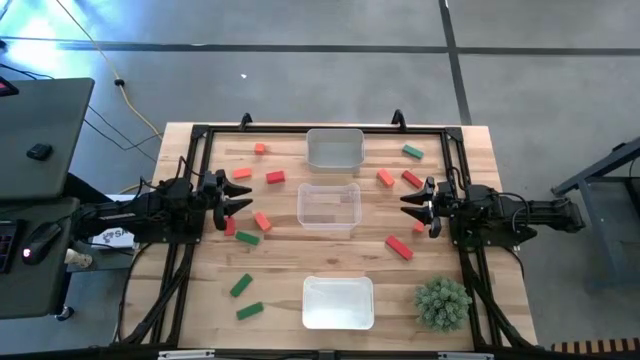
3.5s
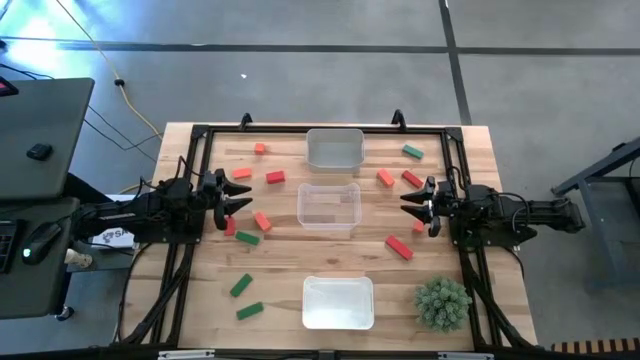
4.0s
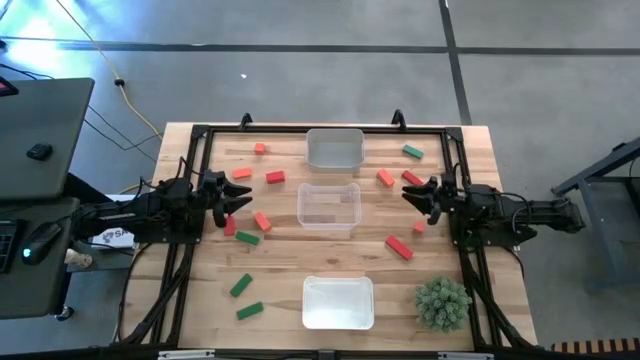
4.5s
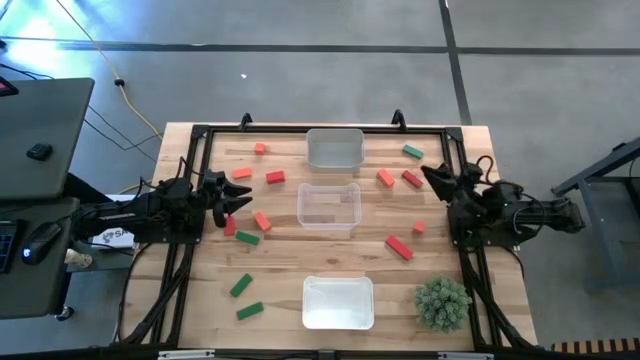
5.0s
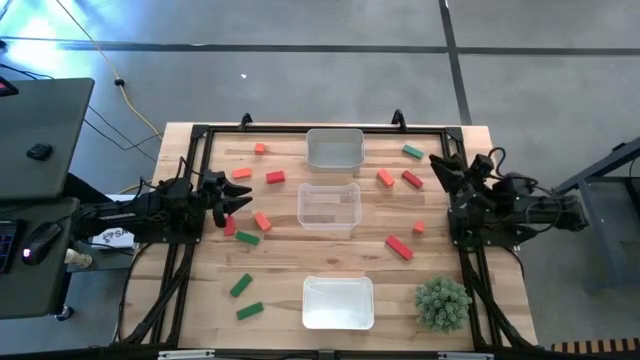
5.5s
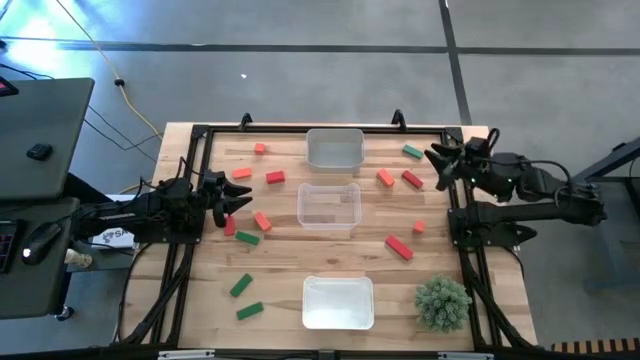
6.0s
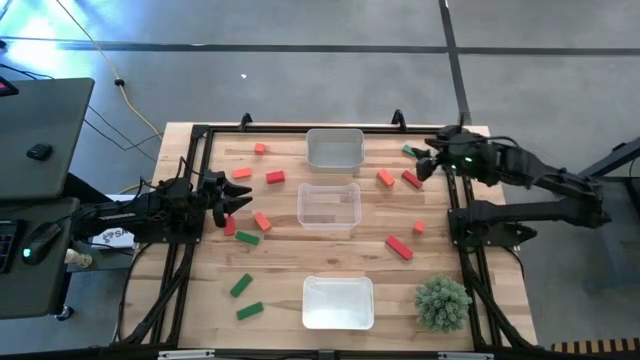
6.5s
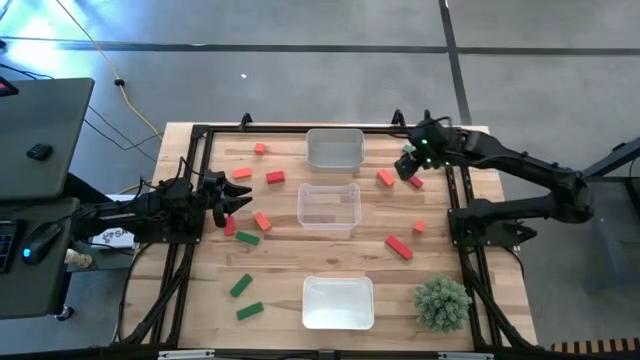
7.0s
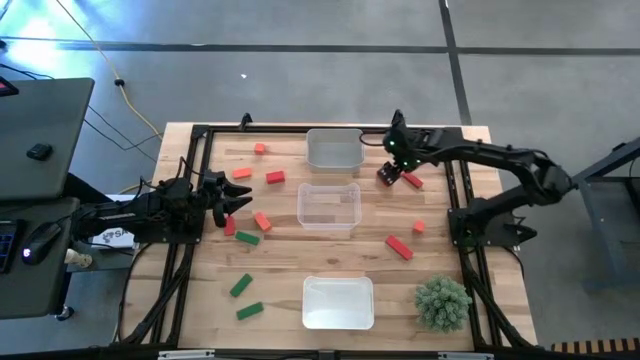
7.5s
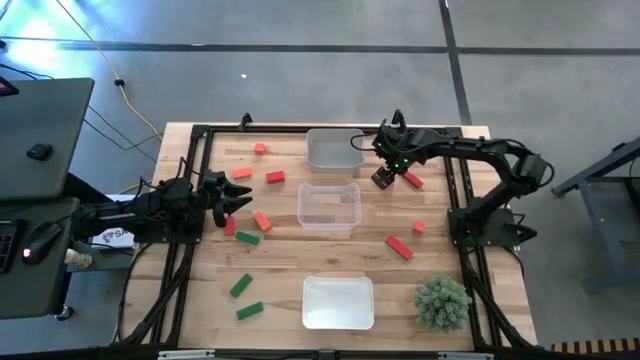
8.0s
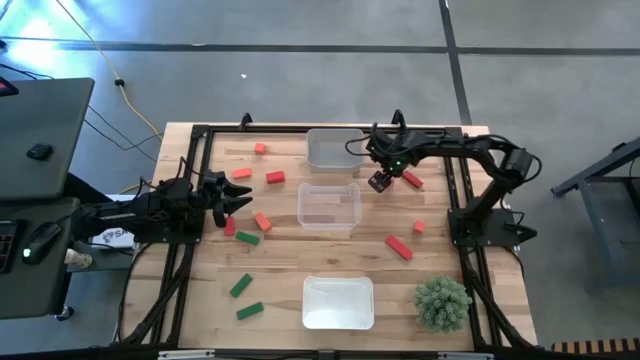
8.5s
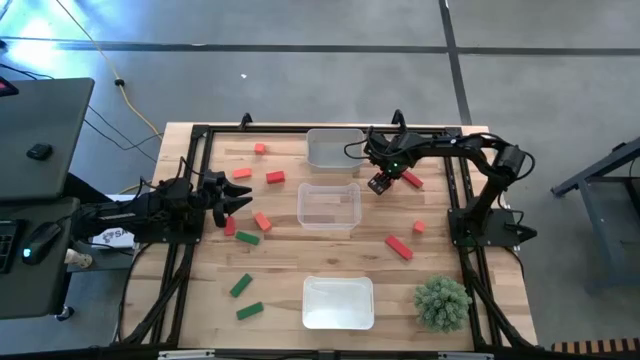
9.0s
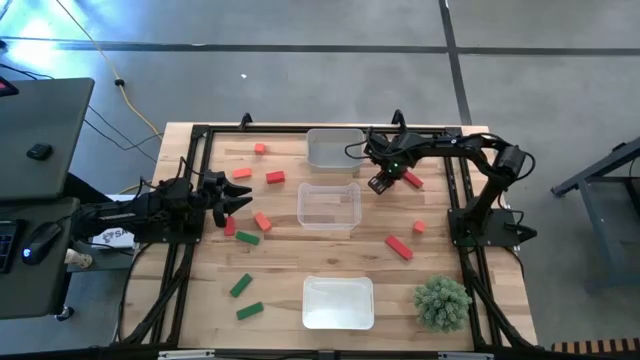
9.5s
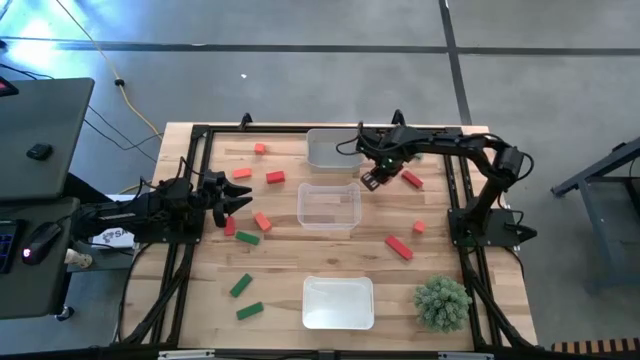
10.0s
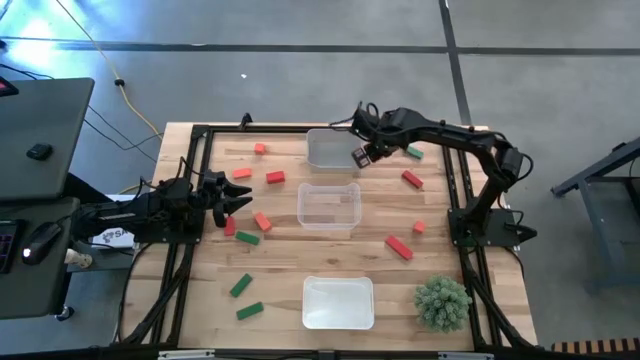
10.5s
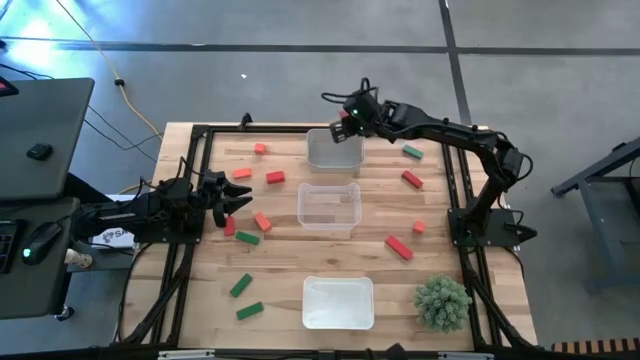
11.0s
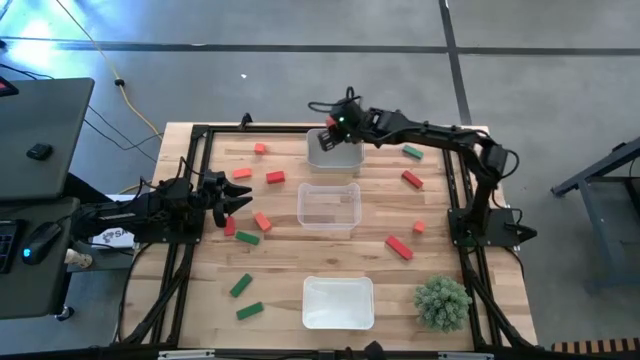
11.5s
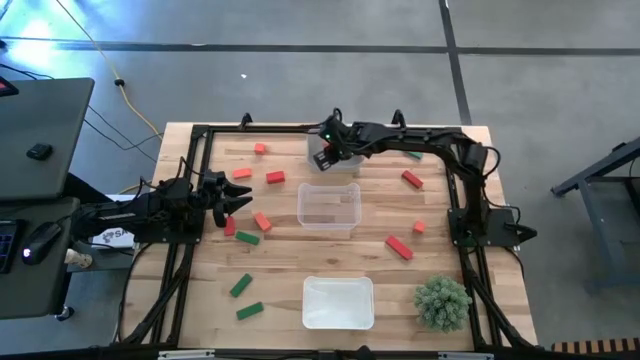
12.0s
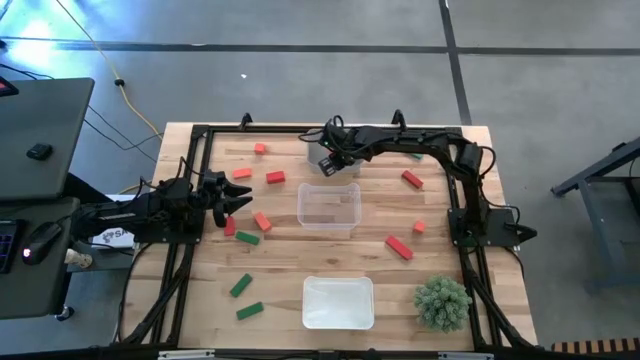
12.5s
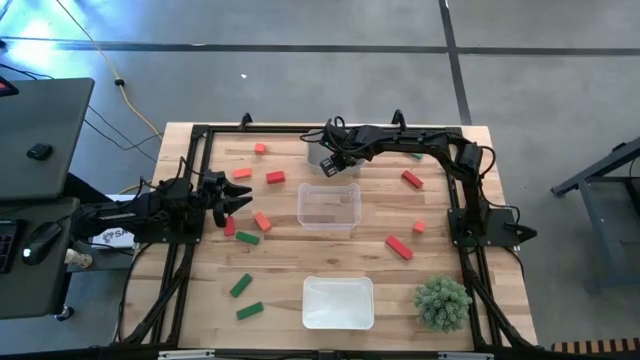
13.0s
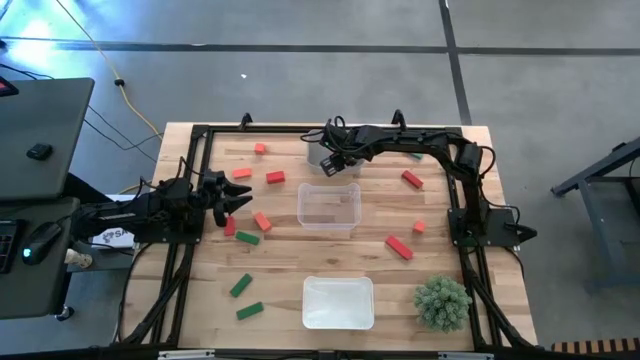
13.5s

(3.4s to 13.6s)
Task: Sort & place blocks by color
Put the orange block into the gray bin

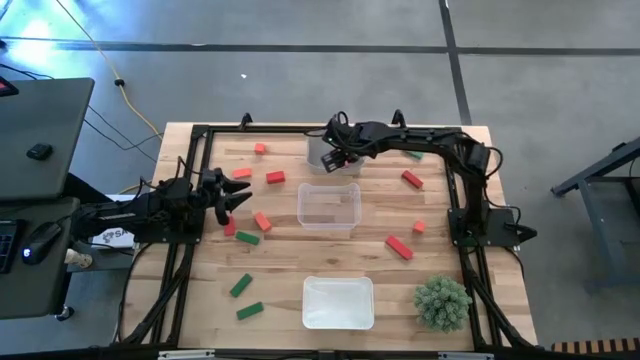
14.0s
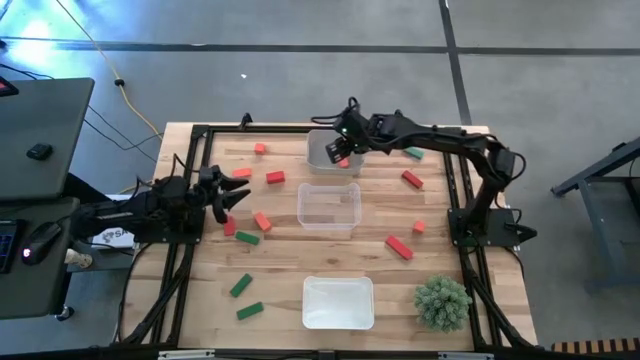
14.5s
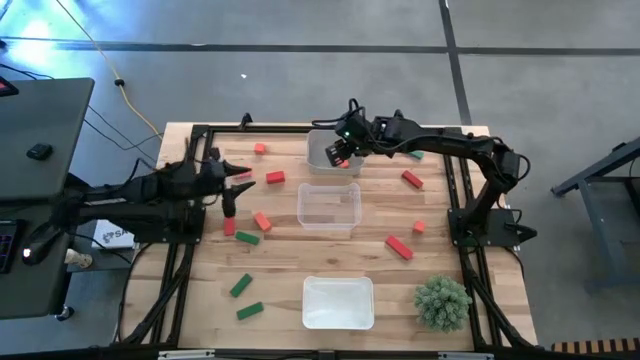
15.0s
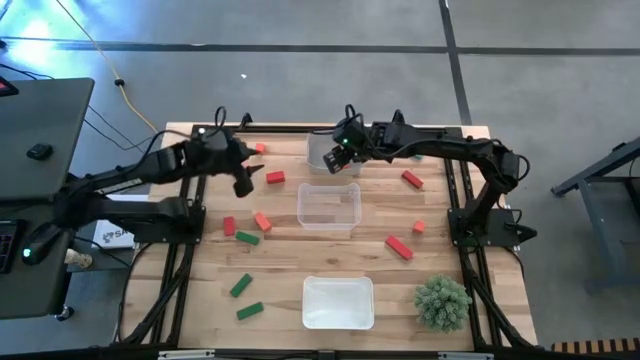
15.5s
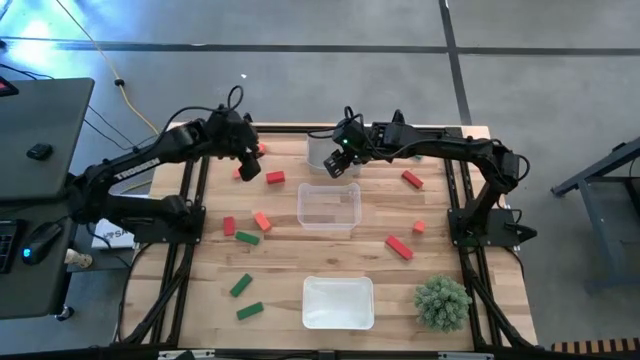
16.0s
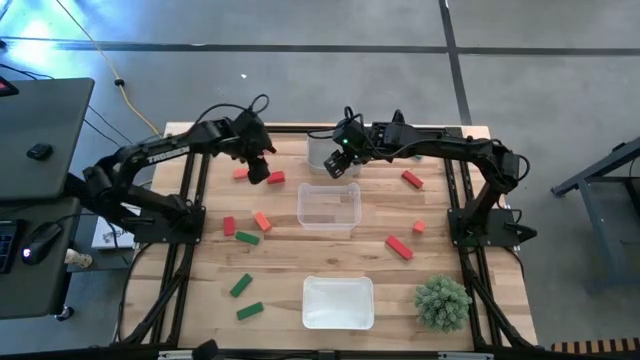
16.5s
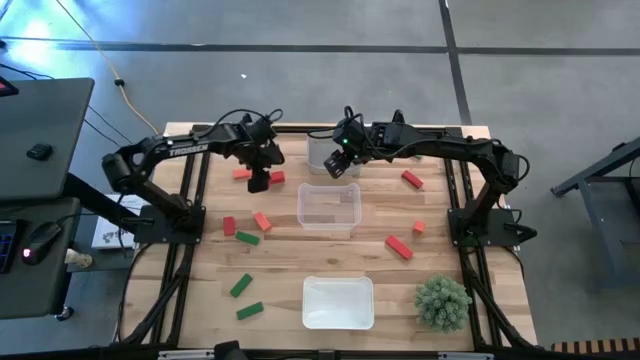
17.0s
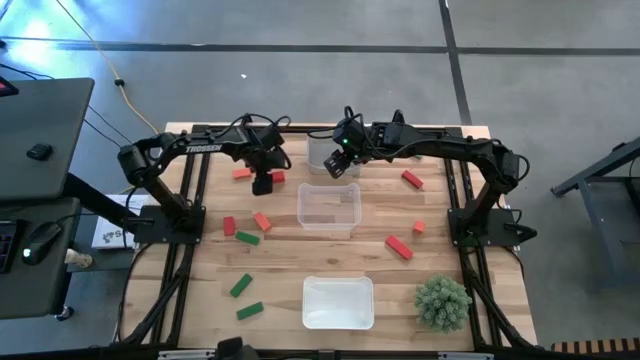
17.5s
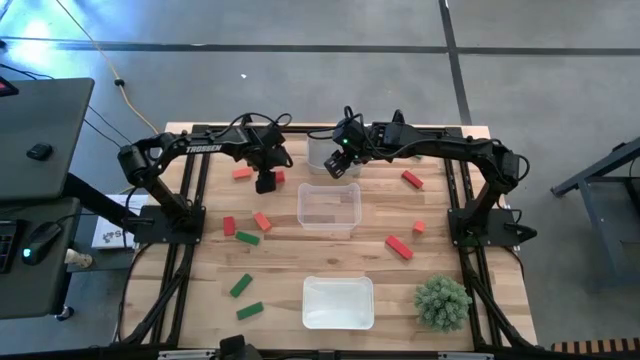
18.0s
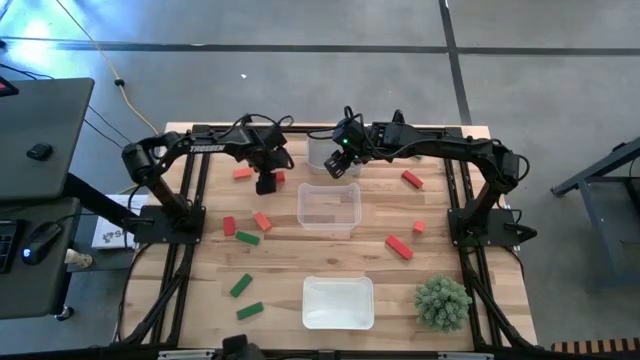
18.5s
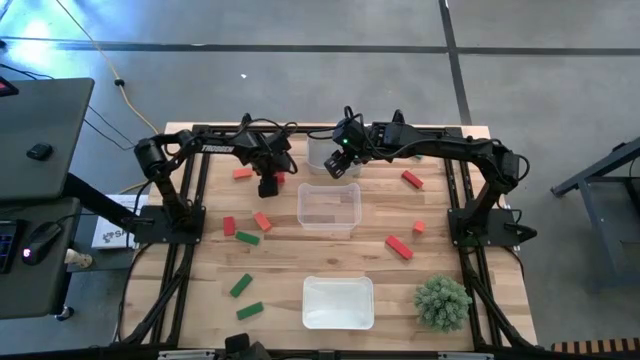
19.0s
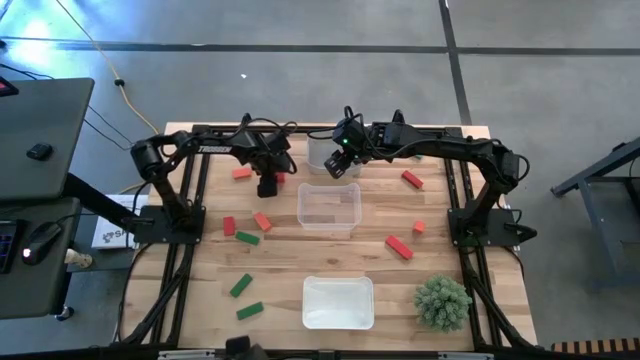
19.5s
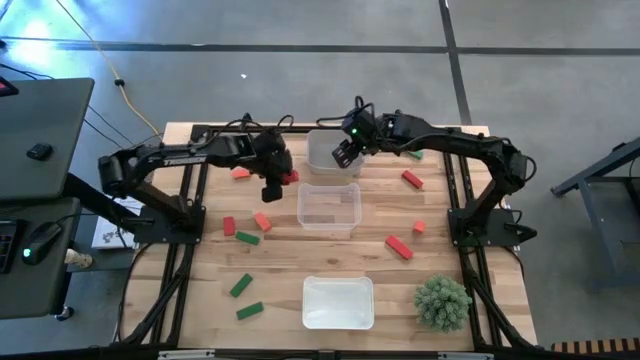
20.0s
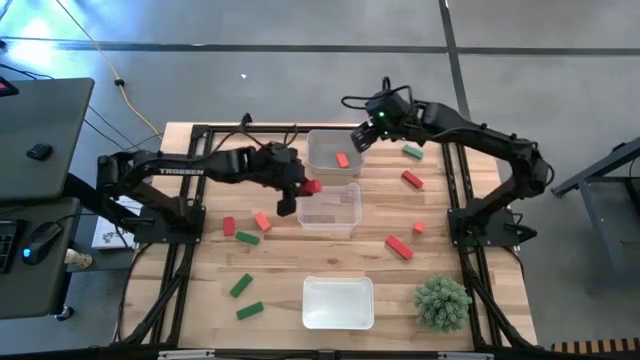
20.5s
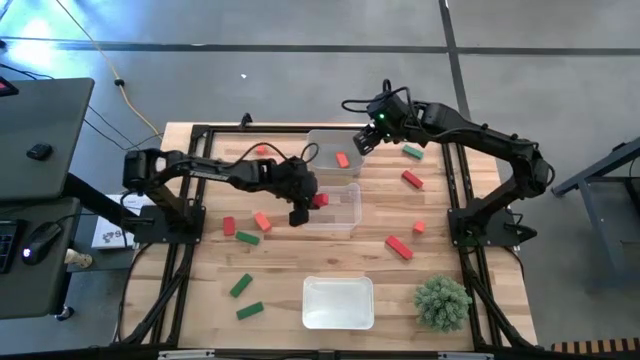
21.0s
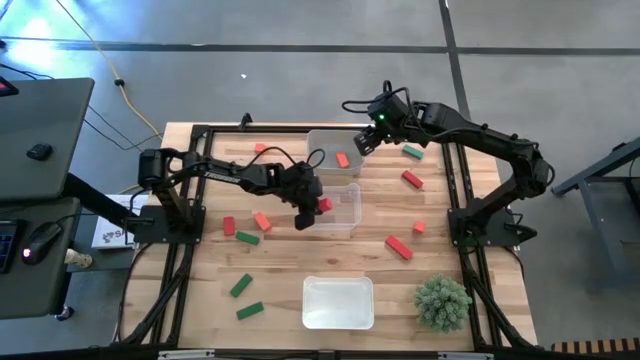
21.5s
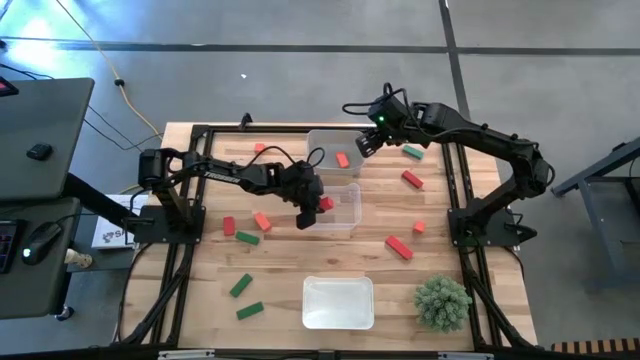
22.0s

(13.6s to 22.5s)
Put the red block into the transparent bin
